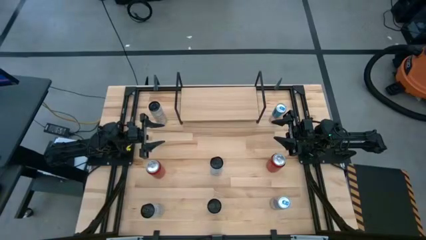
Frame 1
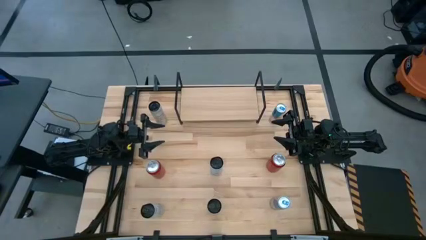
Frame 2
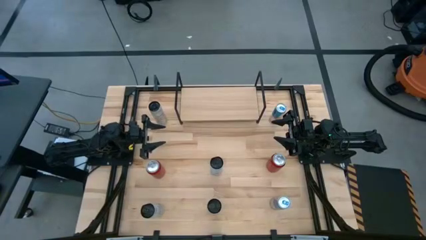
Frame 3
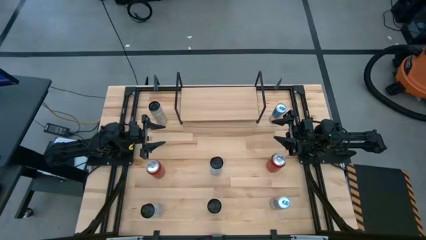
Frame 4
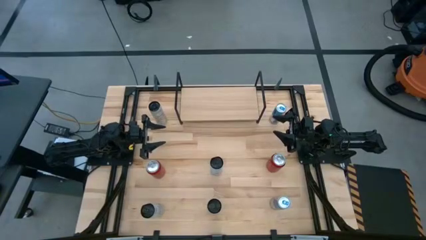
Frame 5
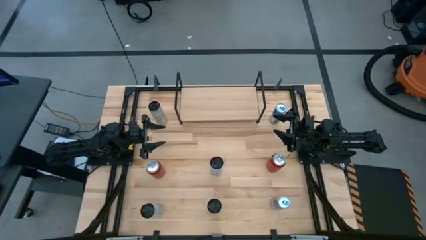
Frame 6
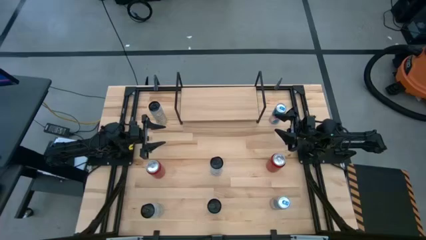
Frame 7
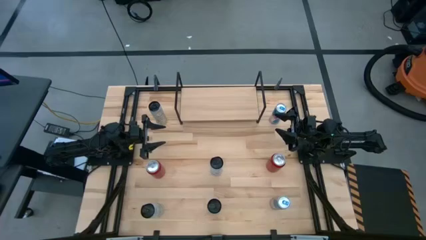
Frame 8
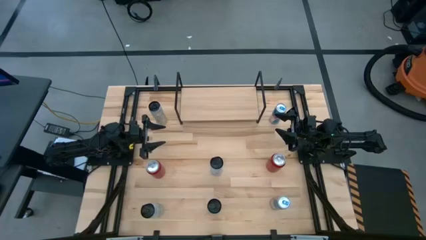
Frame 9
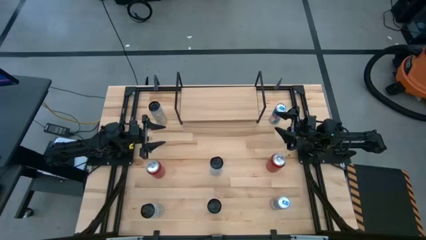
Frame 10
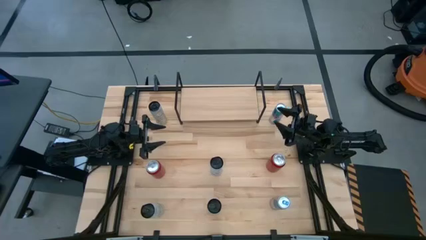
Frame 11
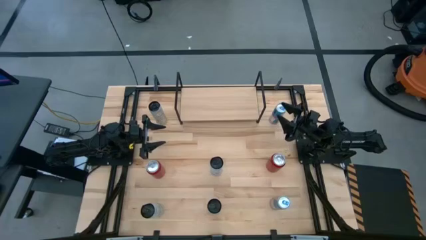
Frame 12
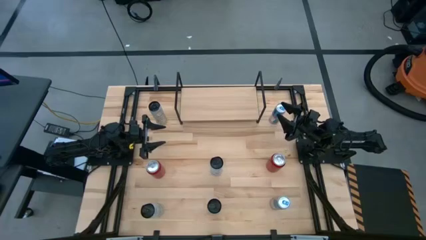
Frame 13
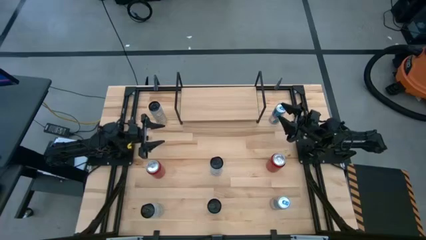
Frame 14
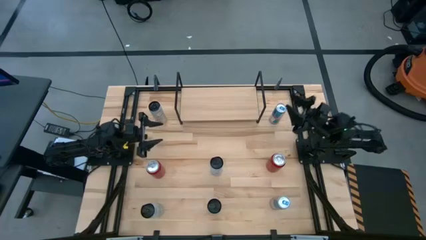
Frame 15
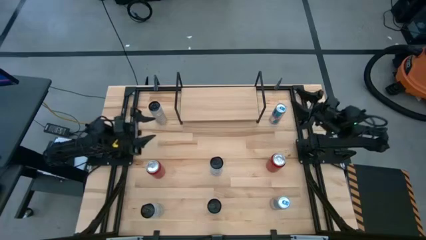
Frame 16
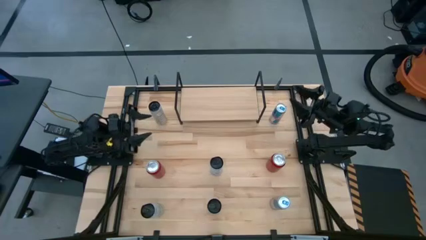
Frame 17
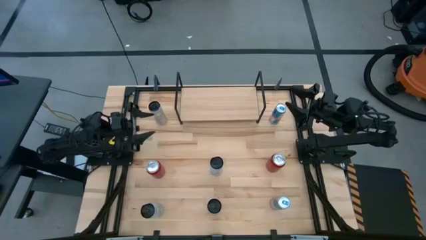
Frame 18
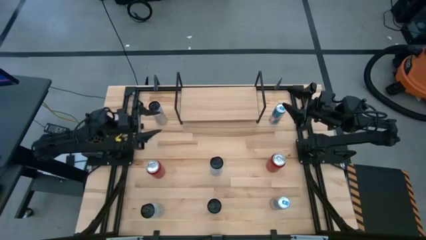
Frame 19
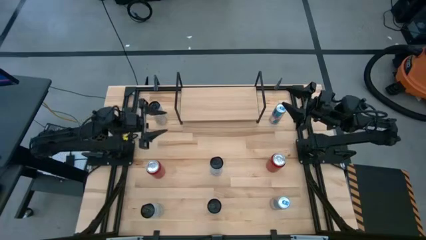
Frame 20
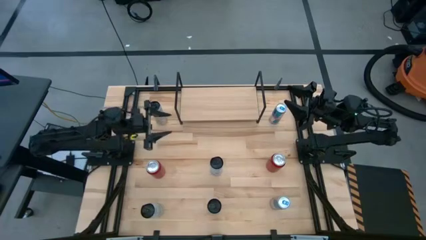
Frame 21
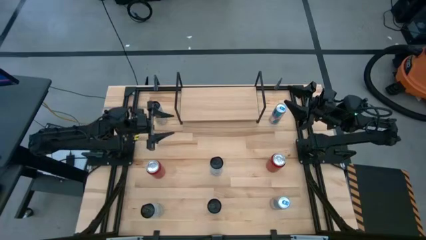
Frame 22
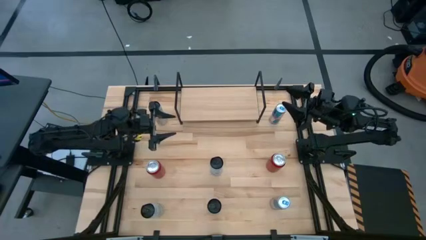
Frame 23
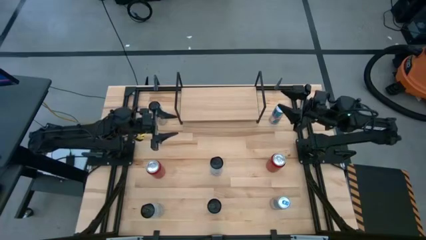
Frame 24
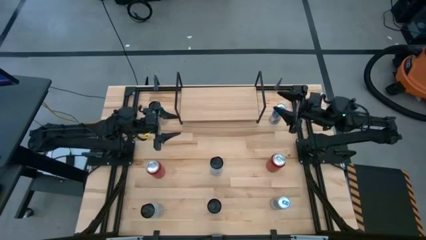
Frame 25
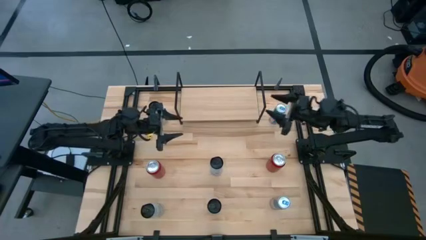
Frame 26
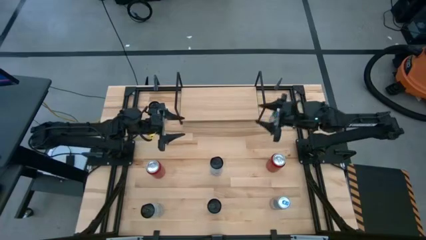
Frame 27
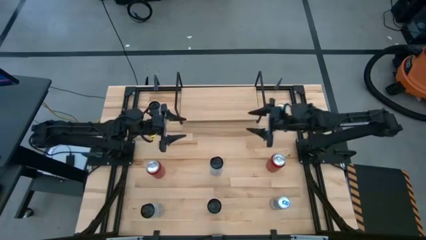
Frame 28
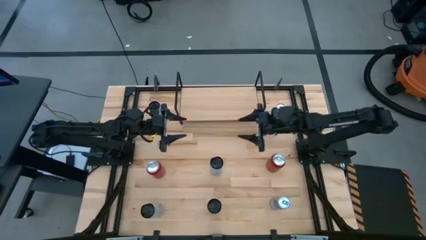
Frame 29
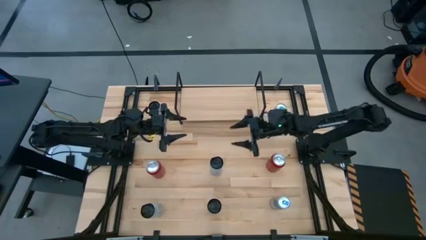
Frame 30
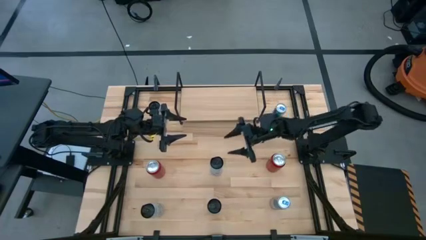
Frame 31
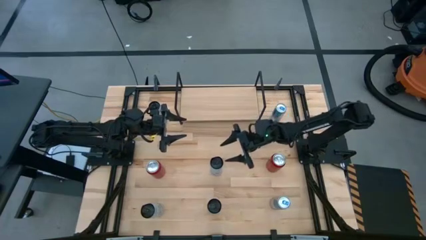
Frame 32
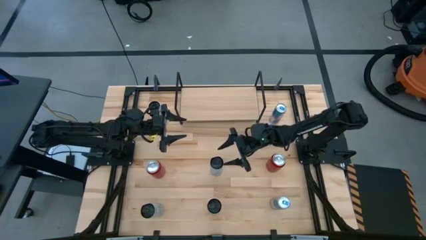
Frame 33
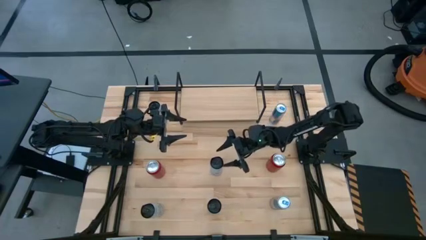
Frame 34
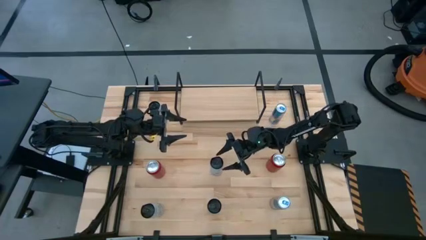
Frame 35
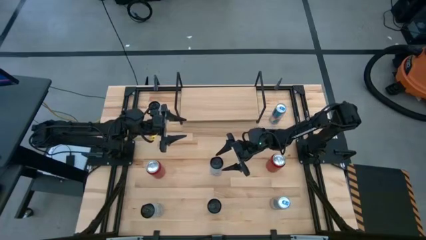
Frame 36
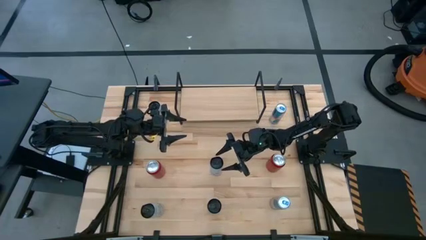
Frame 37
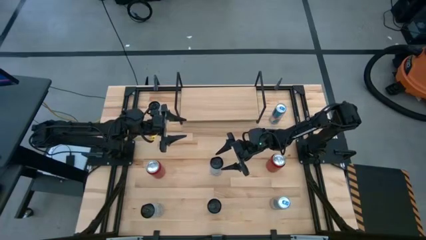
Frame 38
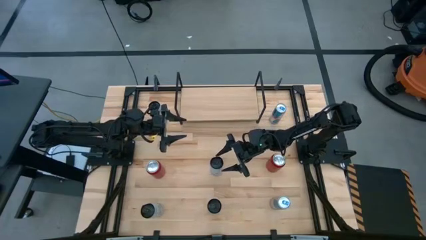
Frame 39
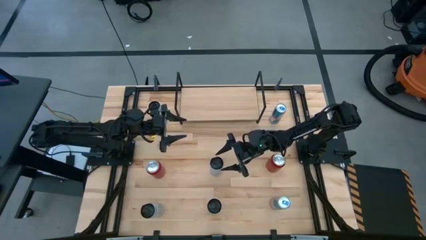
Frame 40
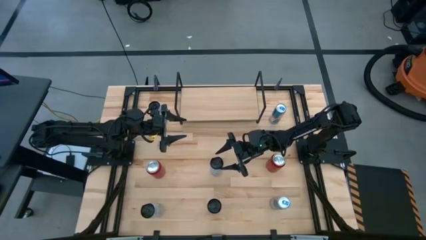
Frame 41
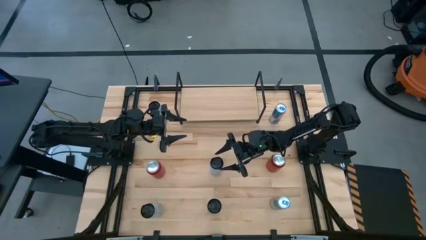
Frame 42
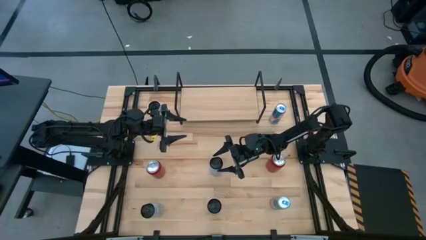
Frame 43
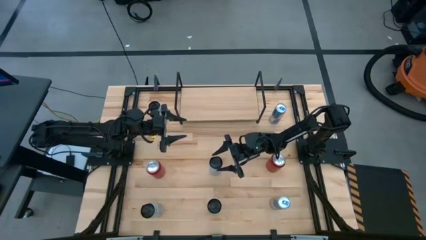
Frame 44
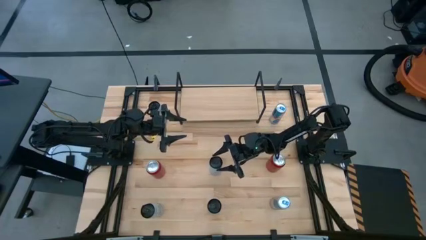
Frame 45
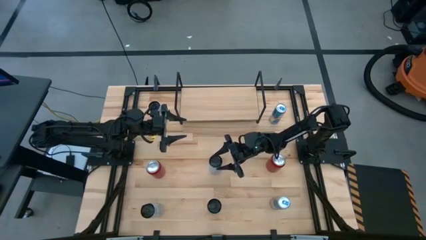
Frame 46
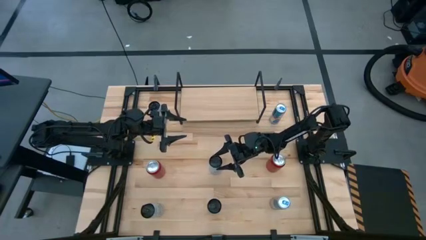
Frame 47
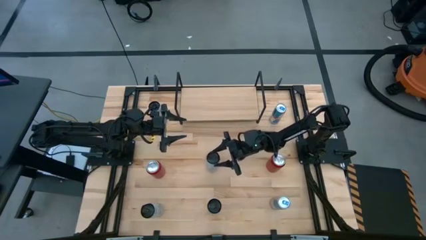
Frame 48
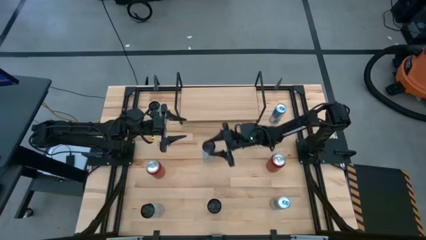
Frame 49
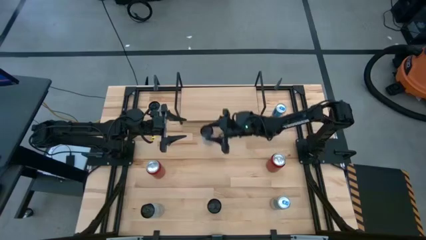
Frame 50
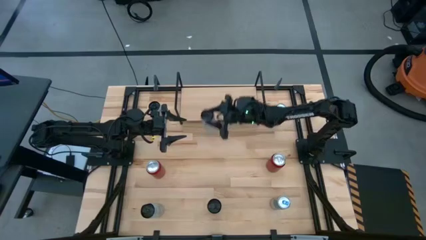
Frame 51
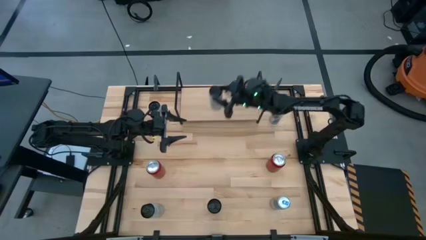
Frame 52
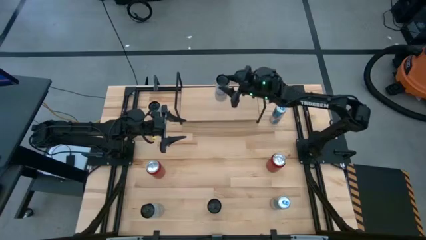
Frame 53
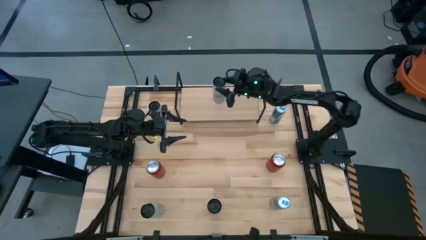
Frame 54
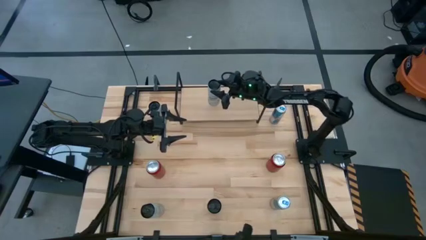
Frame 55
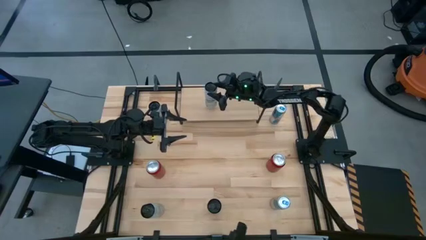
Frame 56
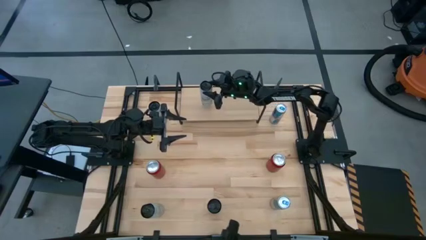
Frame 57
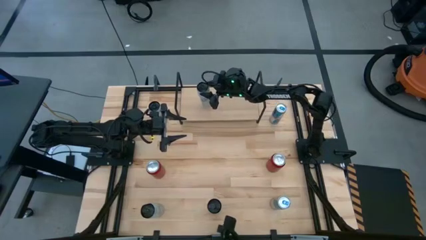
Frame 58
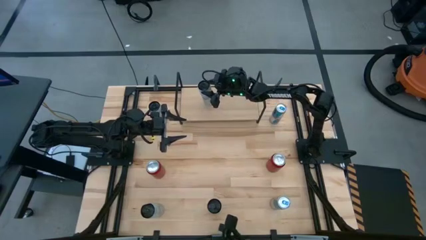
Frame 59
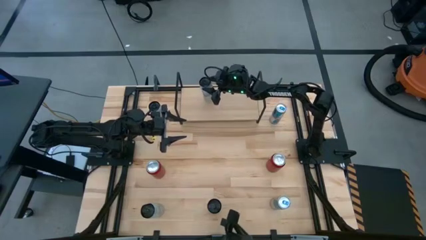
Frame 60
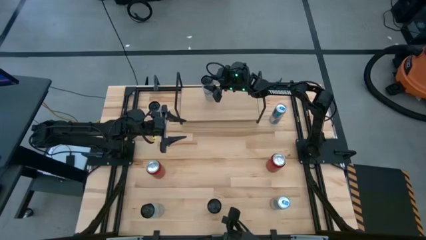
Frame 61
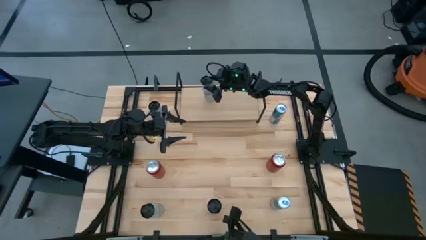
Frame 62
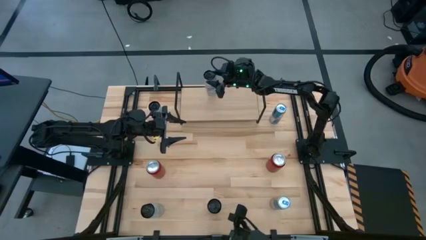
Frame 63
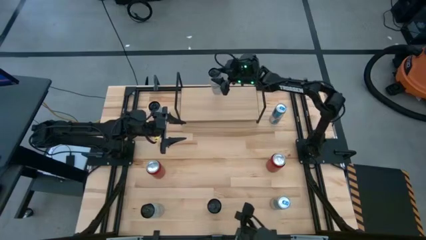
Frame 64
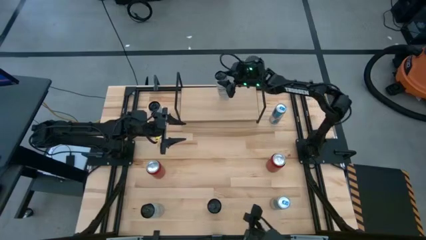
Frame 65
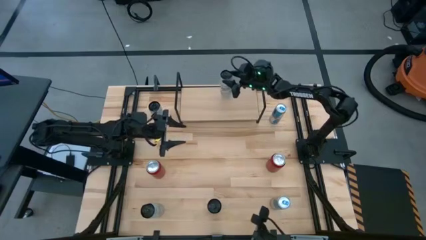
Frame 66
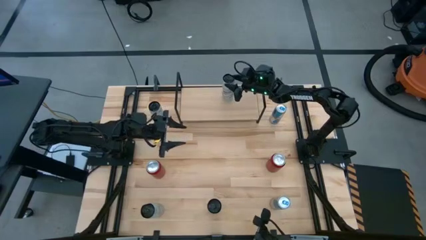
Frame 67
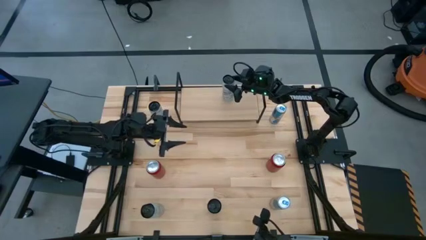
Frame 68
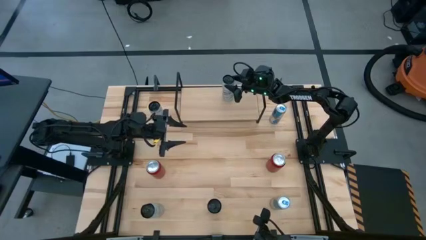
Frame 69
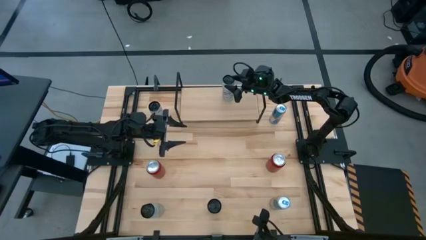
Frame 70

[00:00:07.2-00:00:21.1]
Task: Place canned beverage on shelf
Put the right white soda can on the shelf
